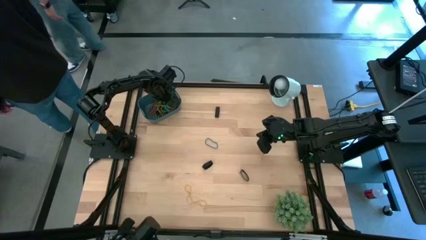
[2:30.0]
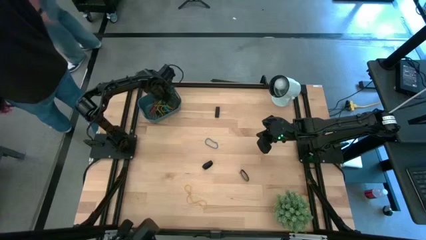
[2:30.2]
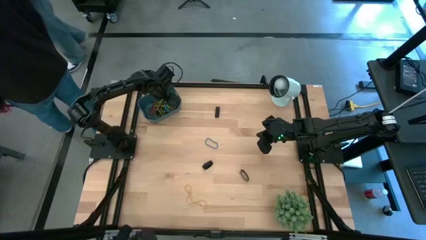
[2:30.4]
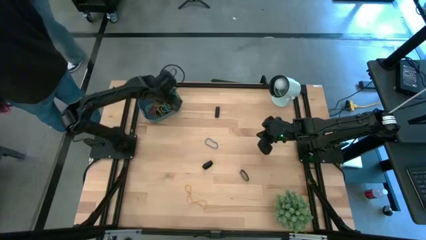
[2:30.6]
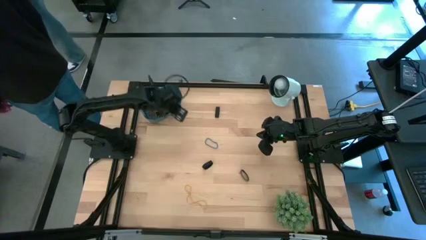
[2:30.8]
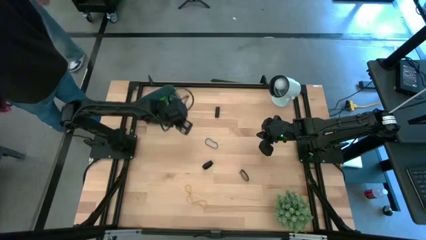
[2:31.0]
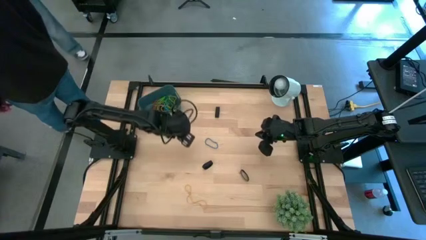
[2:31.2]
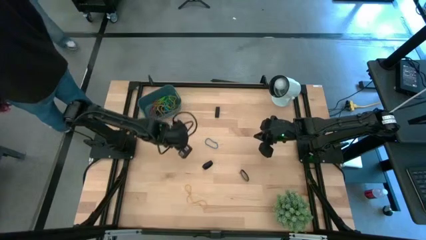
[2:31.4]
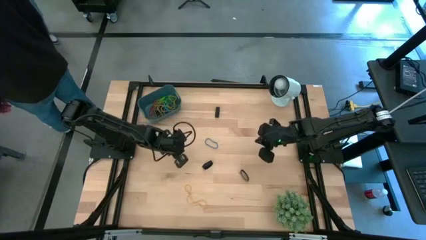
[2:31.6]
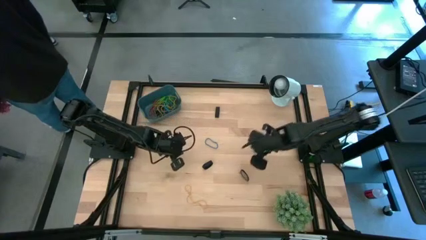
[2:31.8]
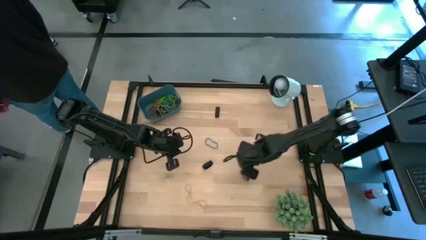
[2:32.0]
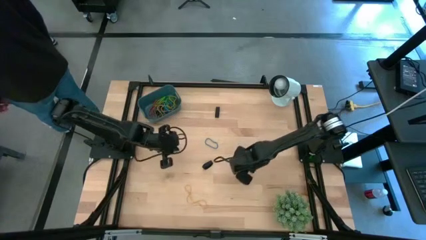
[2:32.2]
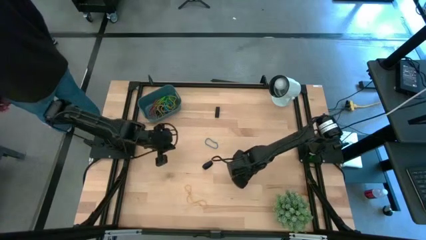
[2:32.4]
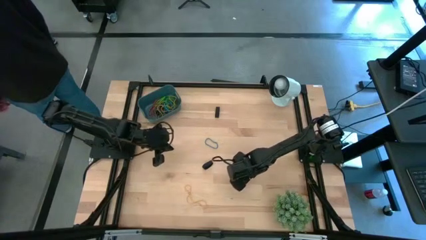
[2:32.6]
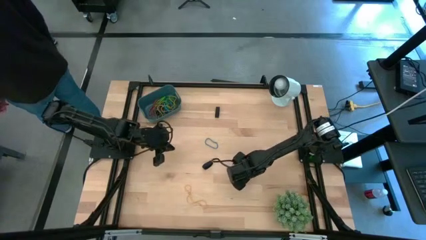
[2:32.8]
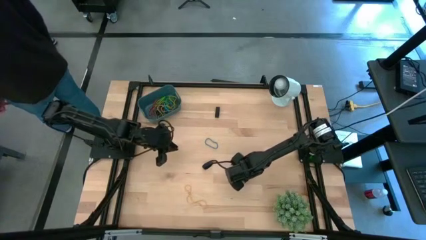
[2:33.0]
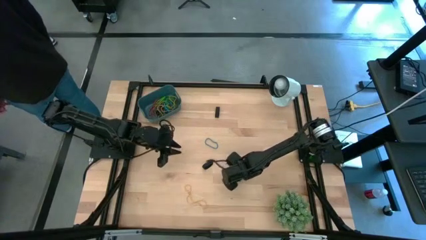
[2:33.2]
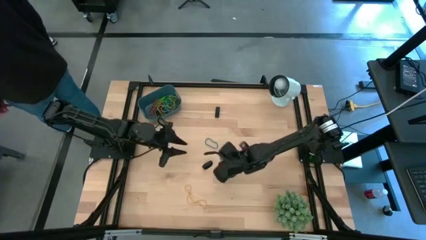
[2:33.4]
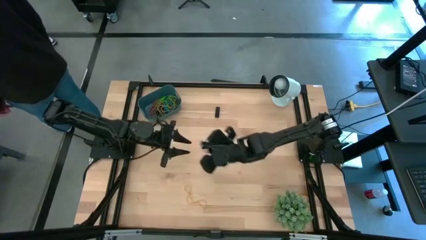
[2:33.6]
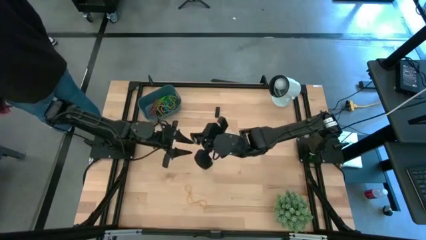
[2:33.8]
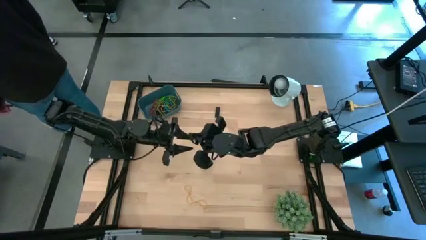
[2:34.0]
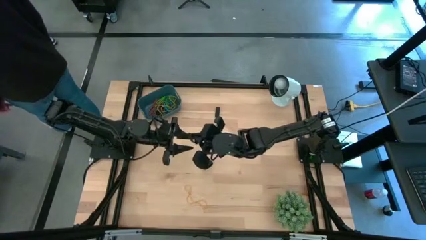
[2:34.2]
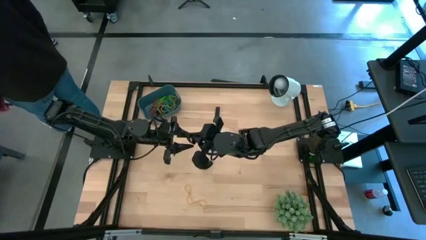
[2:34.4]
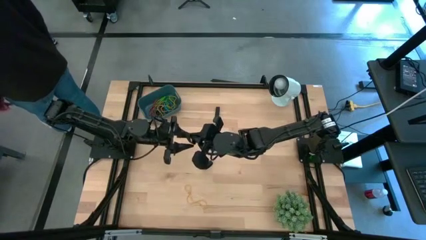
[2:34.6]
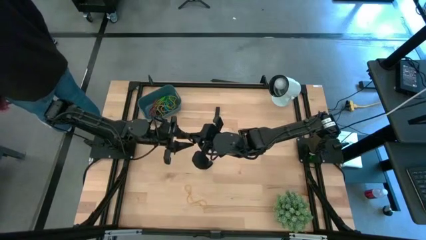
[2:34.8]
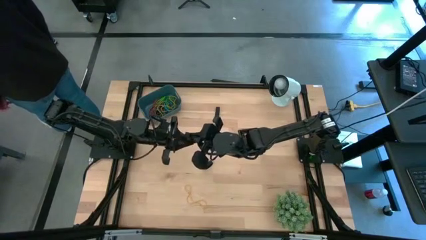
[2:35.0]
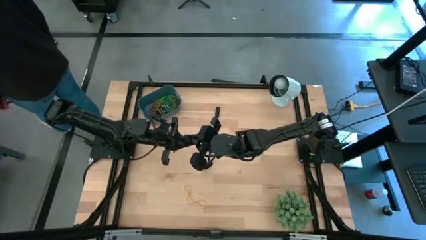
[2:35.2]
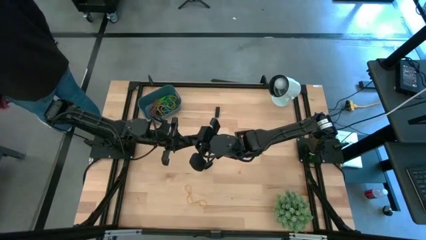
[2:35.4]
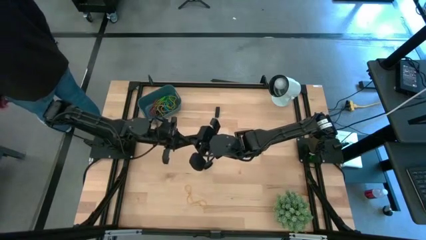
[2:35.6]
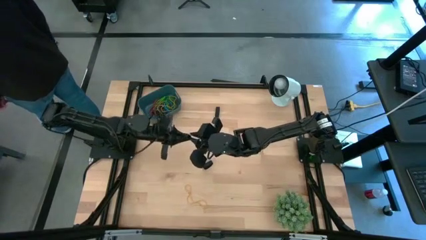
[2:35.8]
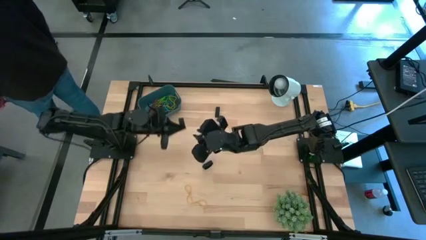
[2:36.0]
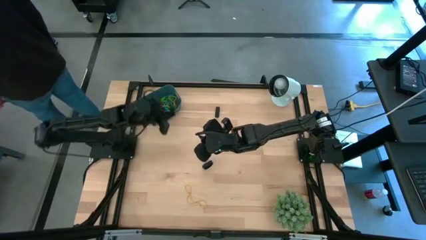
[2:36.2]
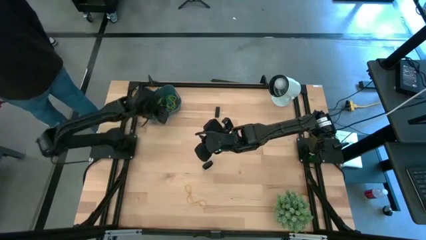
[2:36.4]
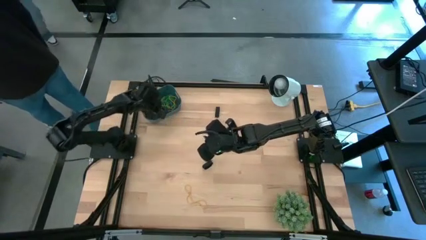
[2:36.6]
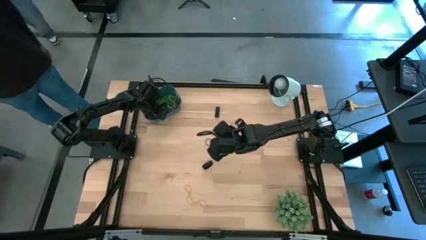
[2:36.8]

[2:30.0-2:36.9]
Task: Pick and place rubber bands into bin
Put the bottom right black rubber band into the bin

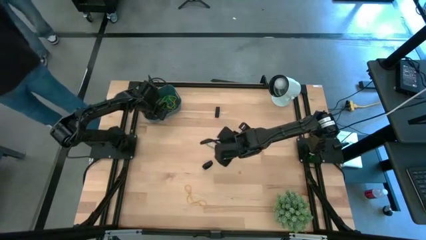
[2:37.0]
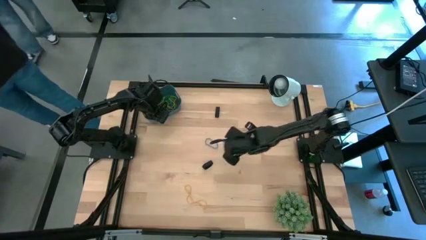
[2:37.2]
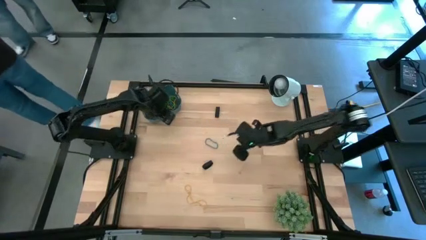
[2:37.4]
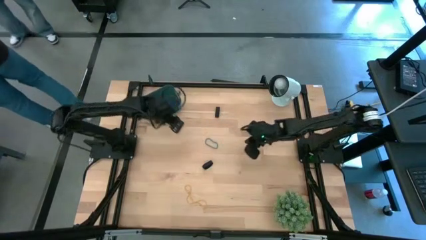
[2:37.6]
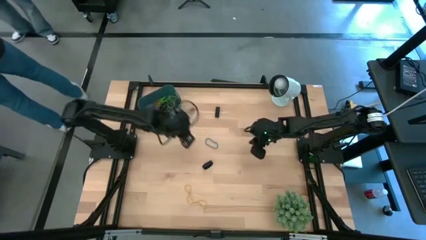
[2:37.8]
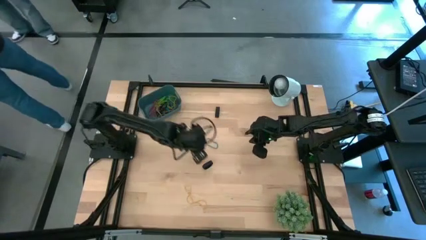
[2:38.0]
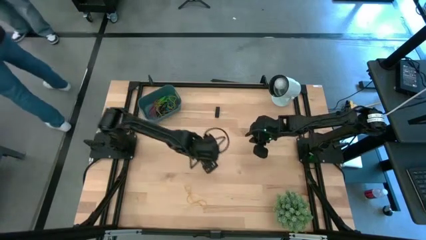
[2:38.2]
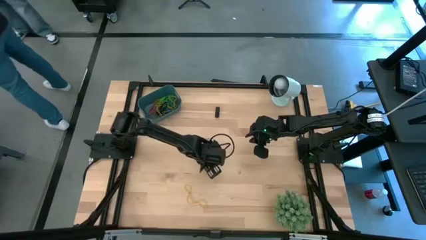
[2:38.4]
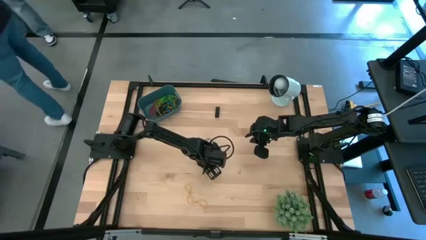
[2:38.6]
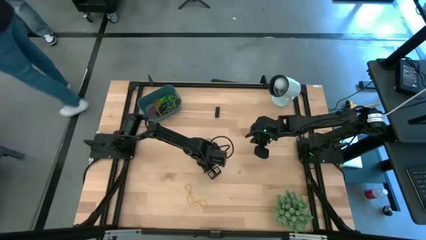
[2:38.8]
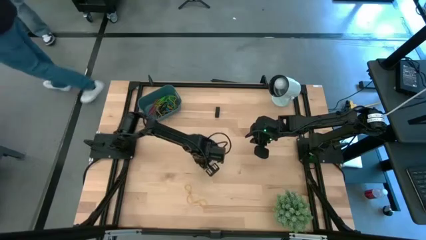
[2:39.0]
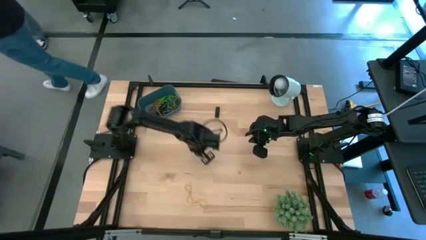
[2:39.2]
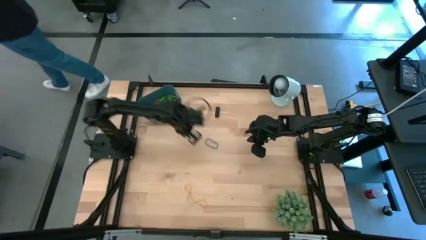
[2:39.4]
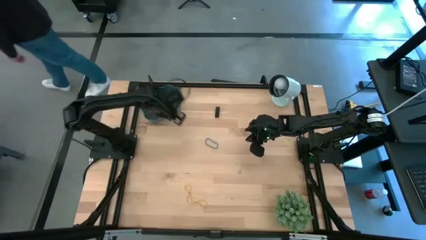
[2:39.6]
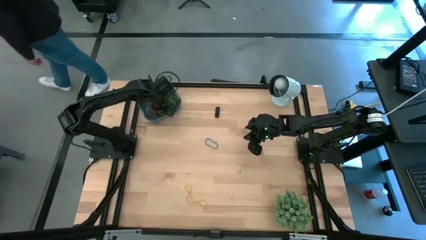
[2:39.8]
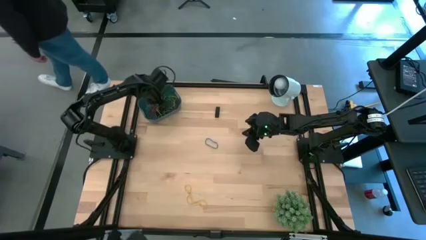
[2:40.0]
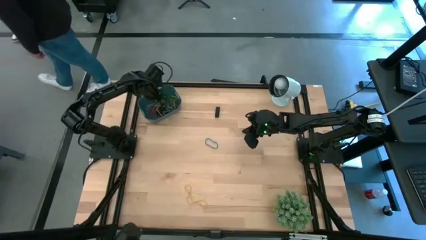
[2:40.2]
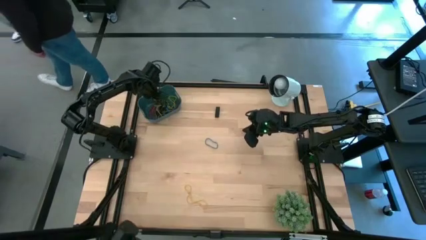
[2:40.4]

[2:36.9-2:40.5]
Put the bottom black rubber band into the bin

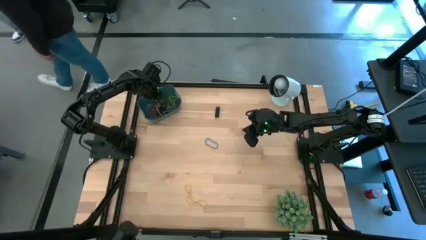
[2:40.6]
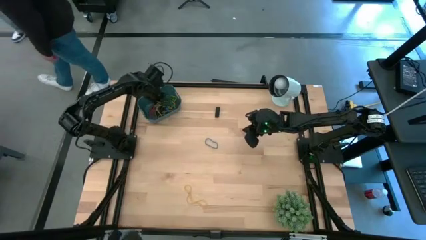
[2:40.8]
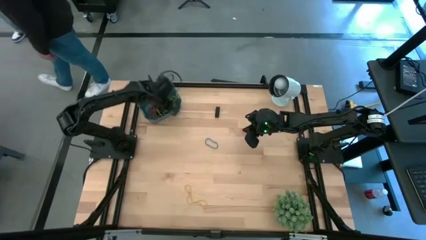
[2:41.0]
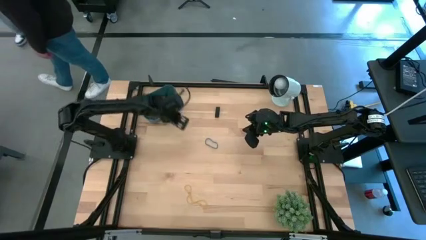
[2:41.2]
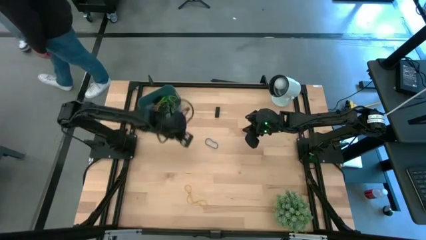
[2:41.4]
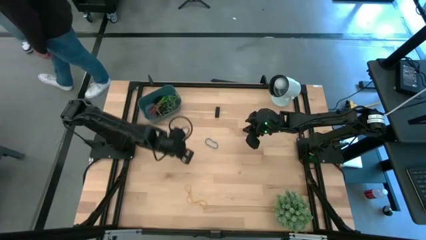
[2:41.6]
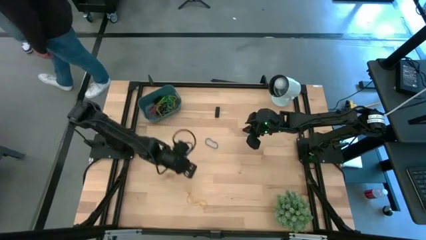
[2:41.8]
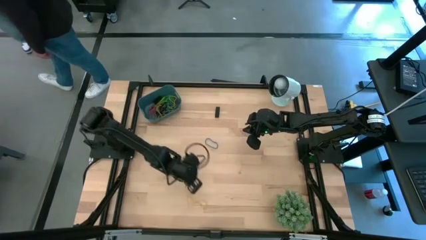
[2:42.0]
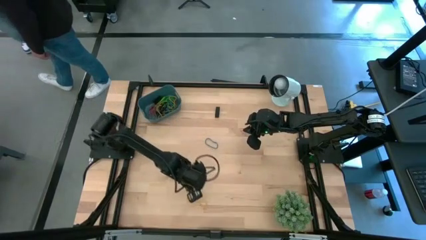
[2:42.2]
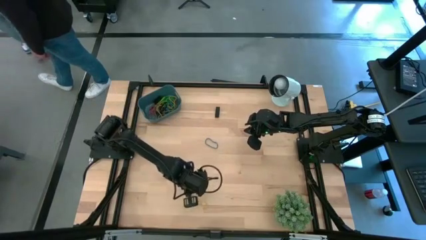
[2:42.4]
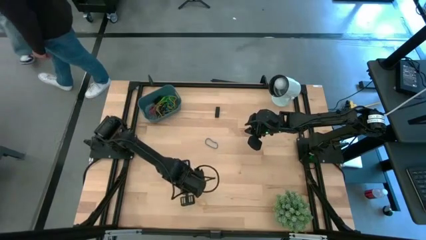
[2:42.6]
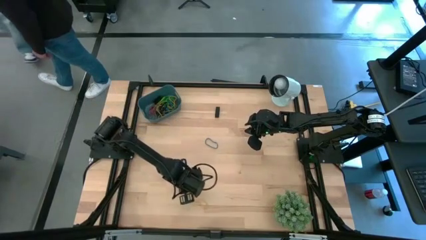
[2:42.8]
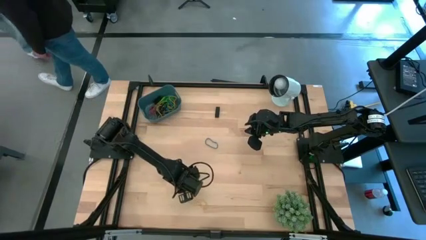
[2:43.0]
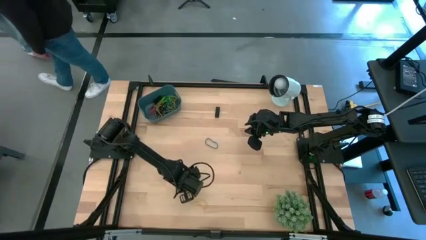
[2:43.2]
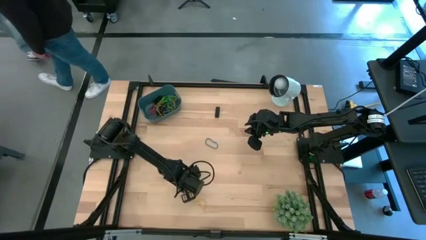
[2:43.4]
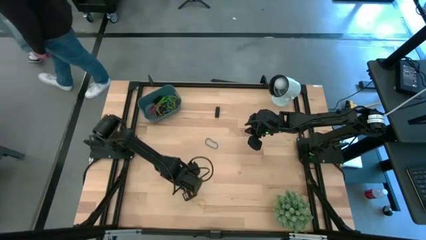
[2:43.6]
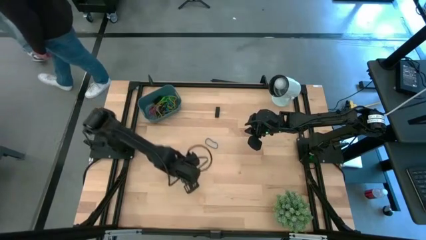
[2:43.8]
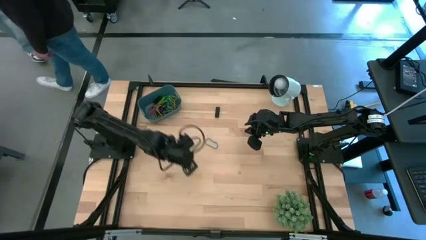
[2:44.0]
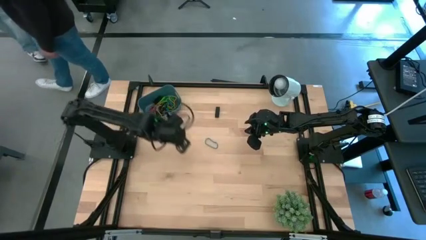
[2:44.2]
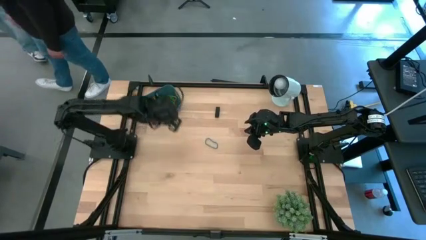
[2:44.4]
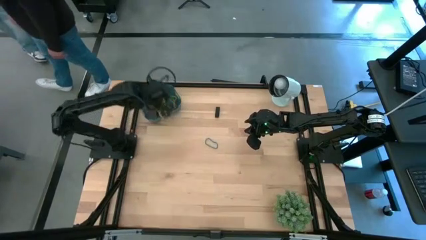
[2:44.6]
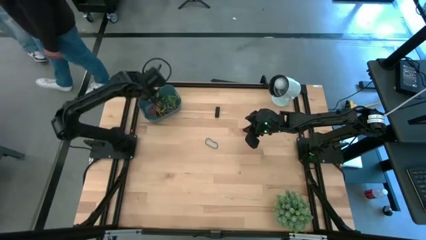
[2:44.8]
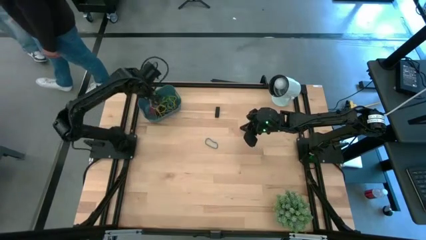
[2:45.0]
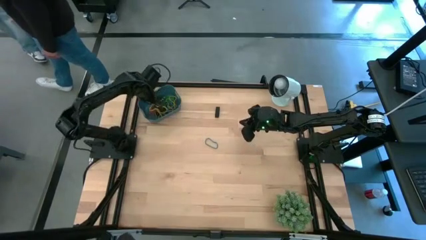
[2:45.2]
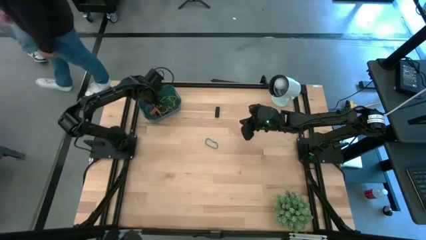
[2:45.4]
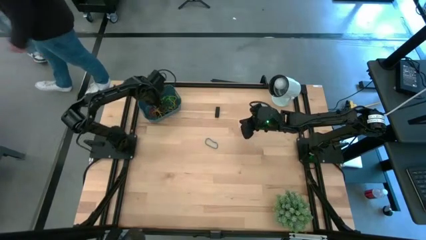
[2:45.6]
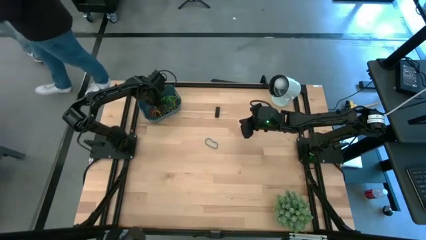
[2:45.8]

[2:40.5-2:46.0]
Put the yellow rubber band into the bin

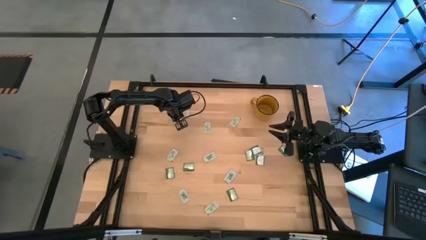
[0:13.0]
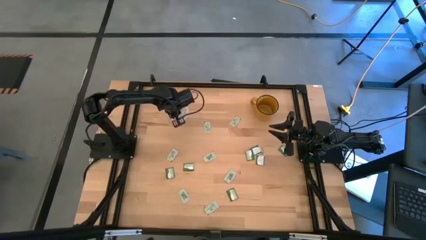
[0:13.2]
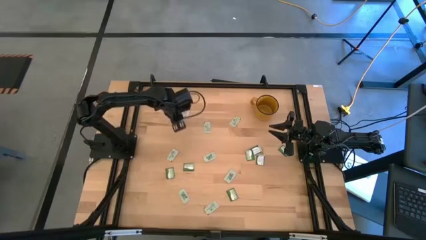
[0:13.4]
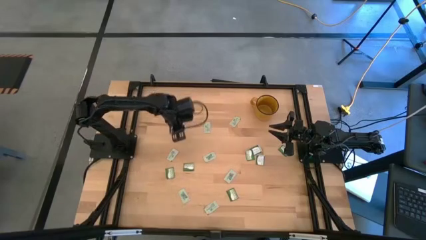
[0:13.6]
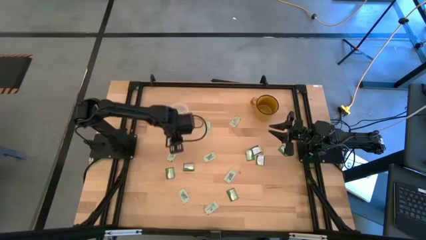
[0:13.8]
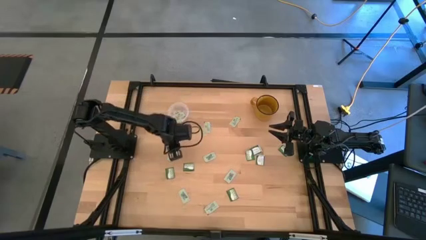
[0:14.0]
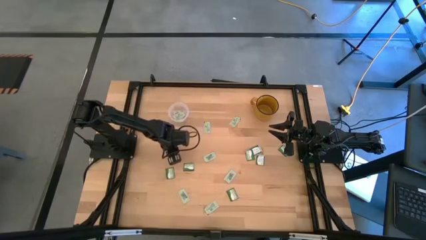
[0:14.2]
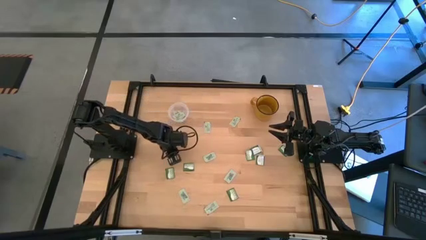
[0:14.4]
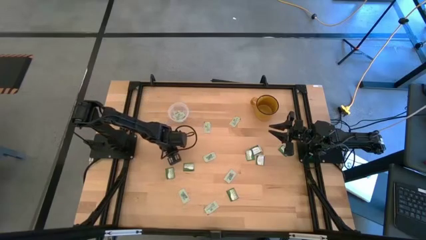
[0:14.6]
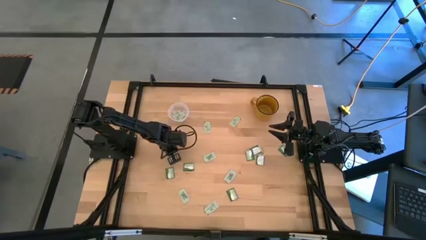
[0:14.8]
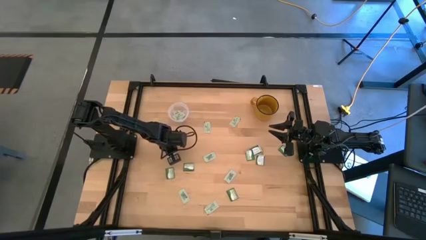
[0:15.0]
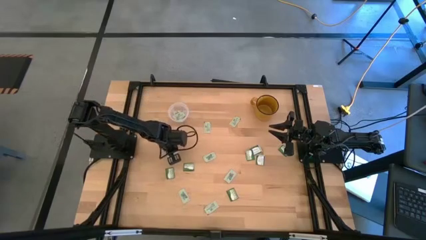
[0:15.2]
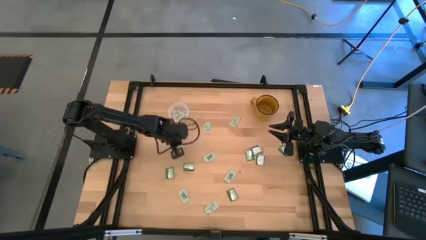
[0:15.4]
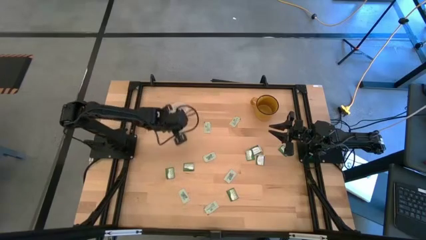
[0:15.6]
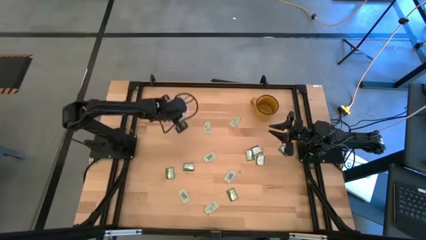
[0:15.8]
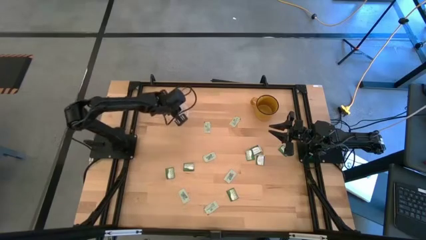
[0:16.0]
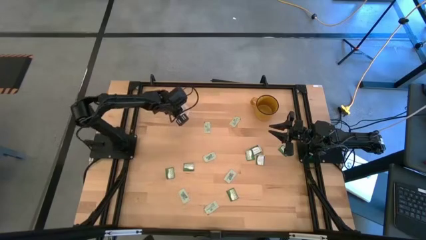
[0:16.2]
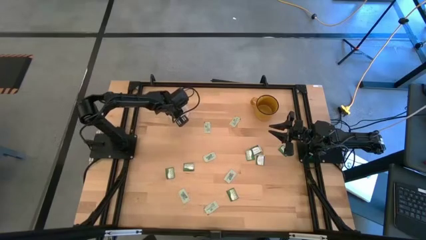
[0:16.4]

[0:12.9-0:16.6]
Task: Pick and place Stevia / Truvia into bins
Put the stevia packet into the transparent container
